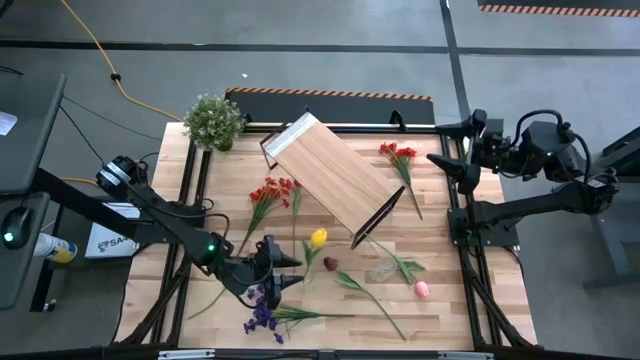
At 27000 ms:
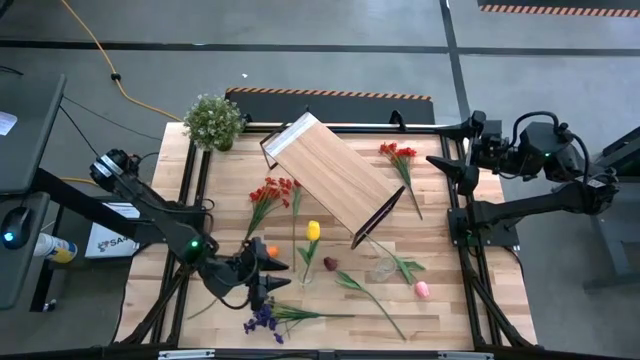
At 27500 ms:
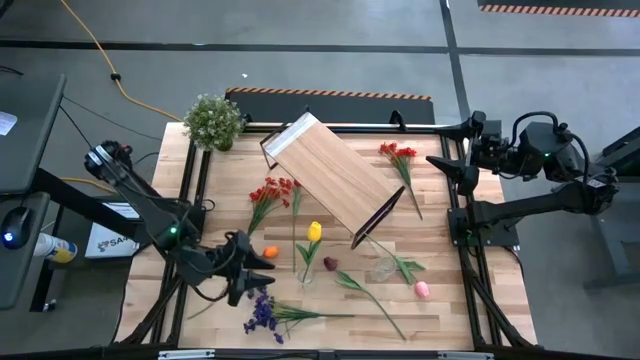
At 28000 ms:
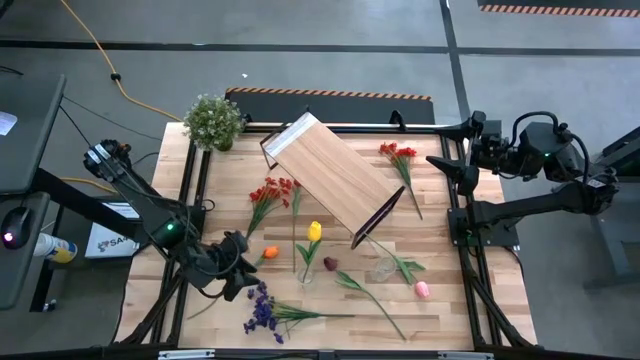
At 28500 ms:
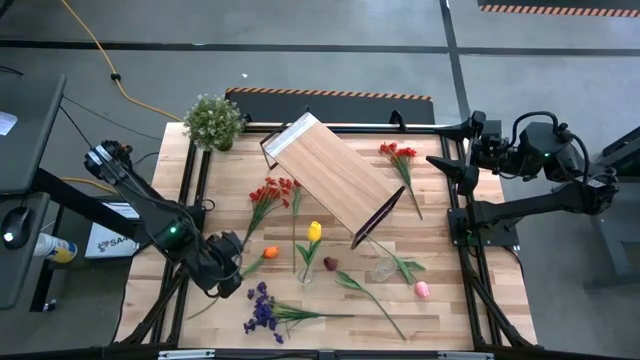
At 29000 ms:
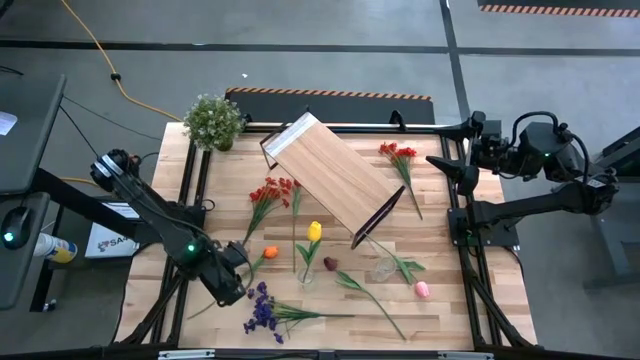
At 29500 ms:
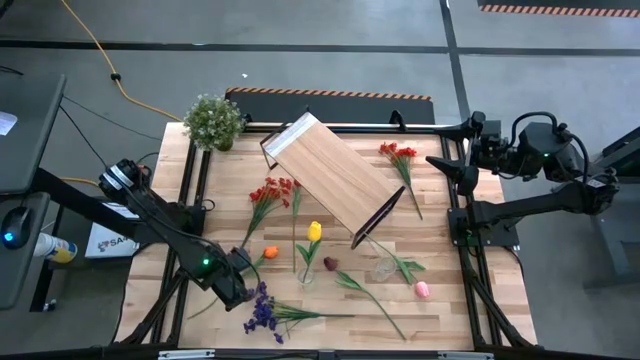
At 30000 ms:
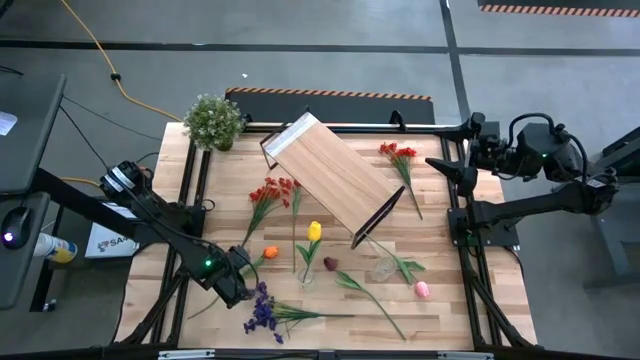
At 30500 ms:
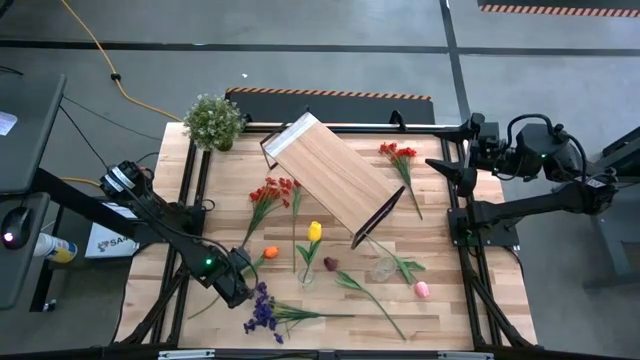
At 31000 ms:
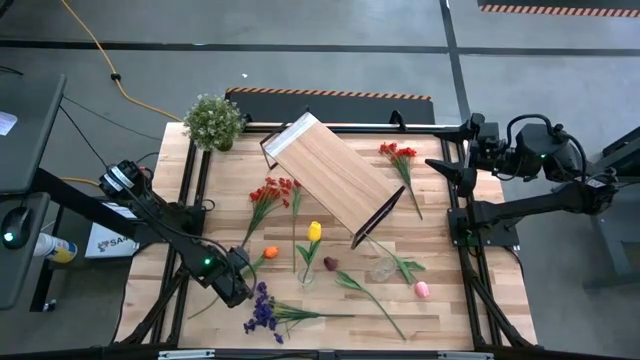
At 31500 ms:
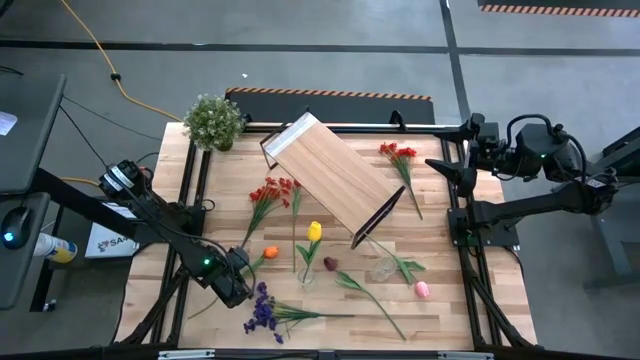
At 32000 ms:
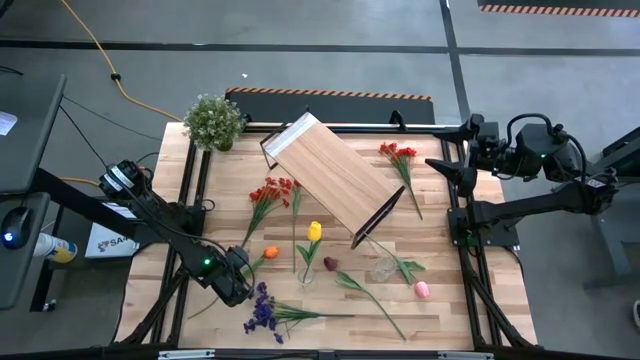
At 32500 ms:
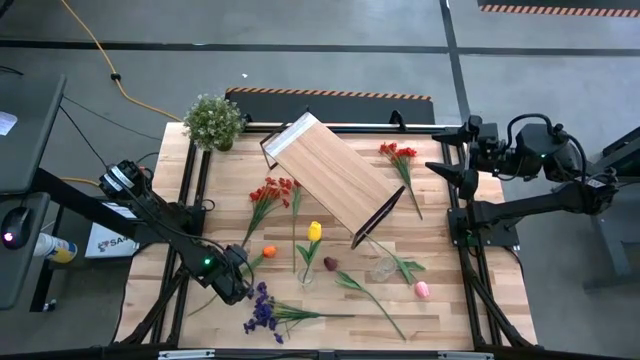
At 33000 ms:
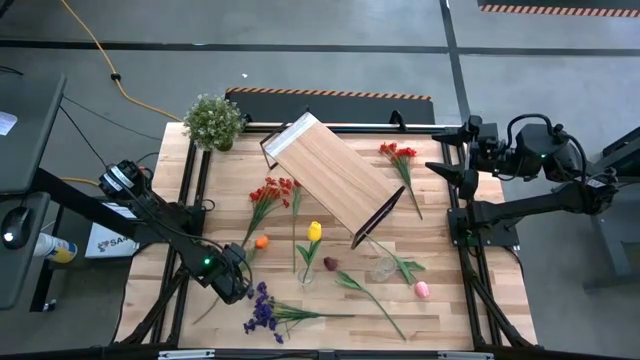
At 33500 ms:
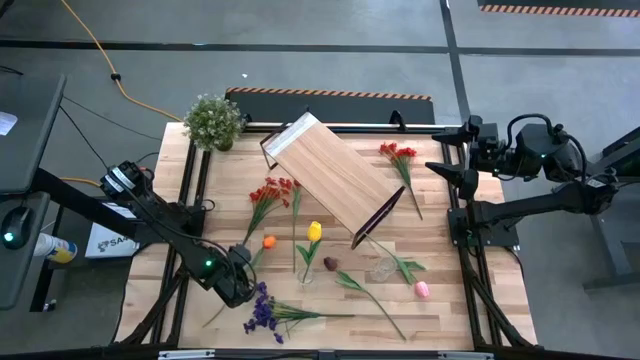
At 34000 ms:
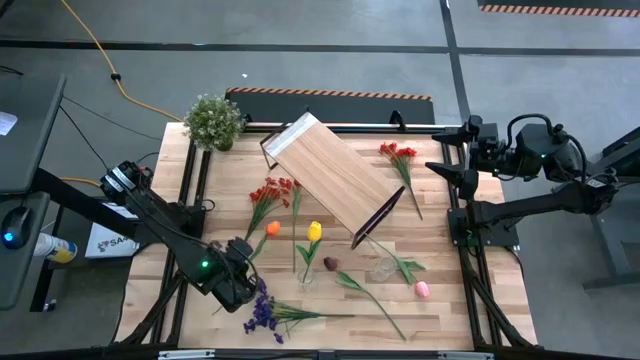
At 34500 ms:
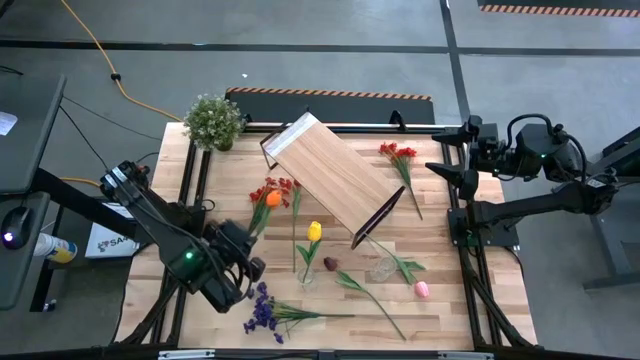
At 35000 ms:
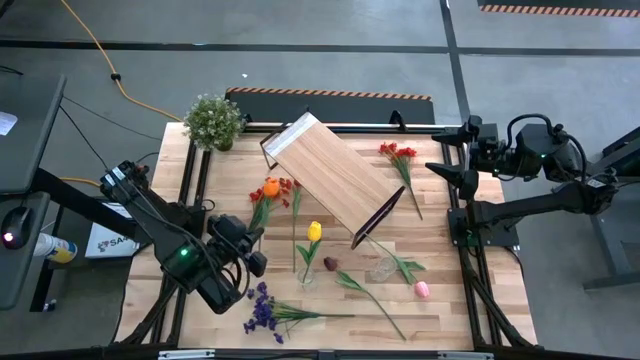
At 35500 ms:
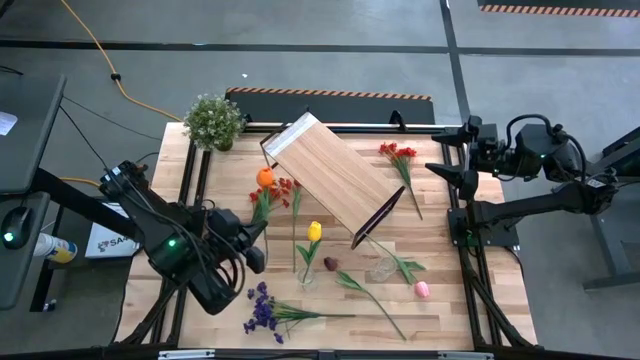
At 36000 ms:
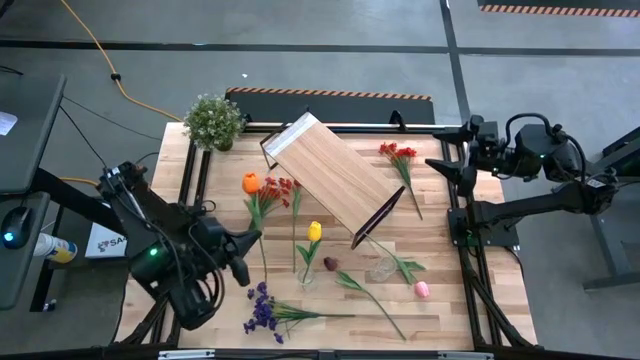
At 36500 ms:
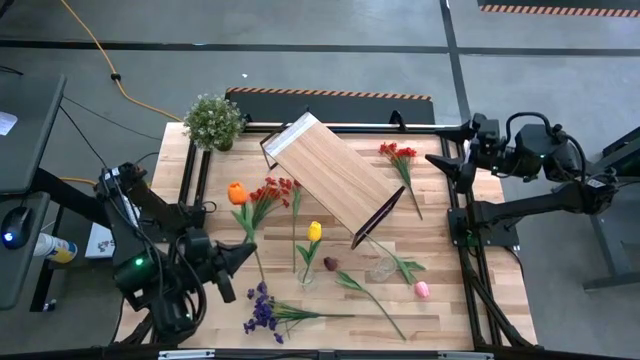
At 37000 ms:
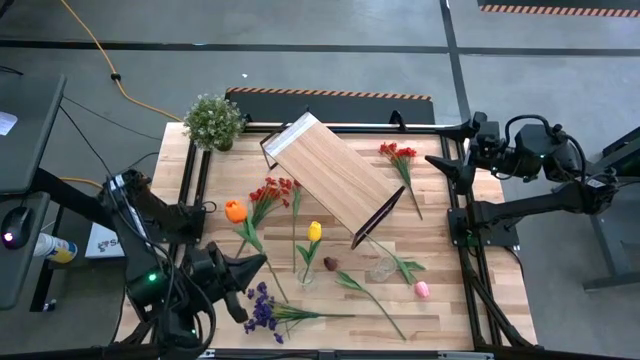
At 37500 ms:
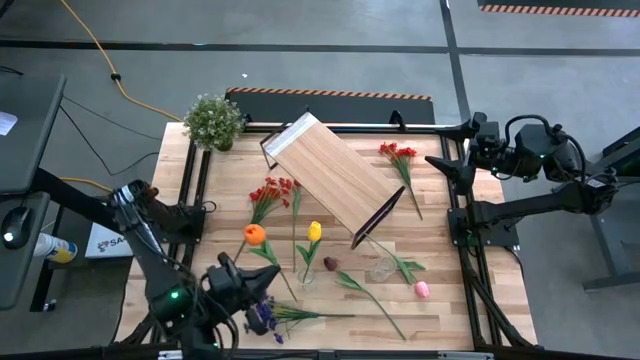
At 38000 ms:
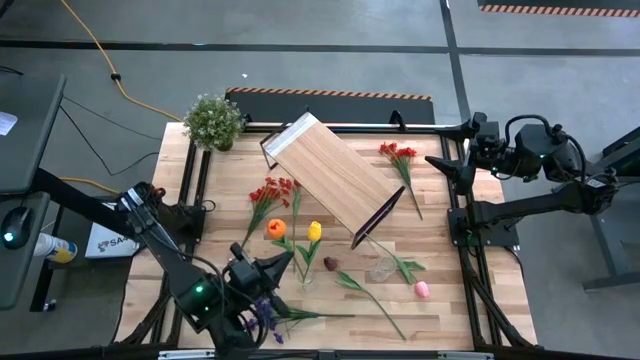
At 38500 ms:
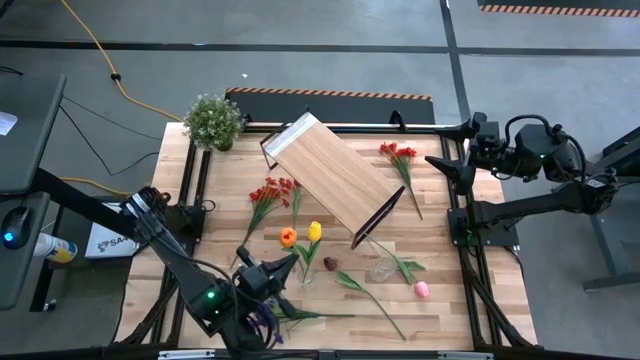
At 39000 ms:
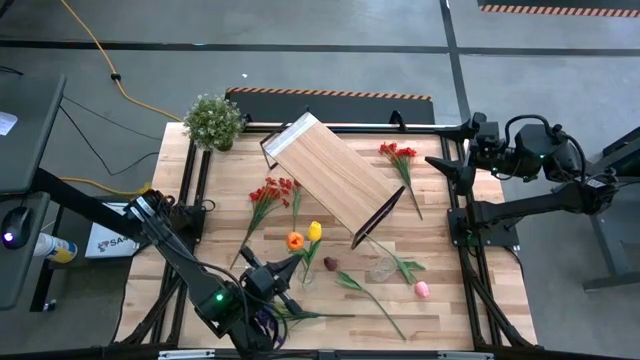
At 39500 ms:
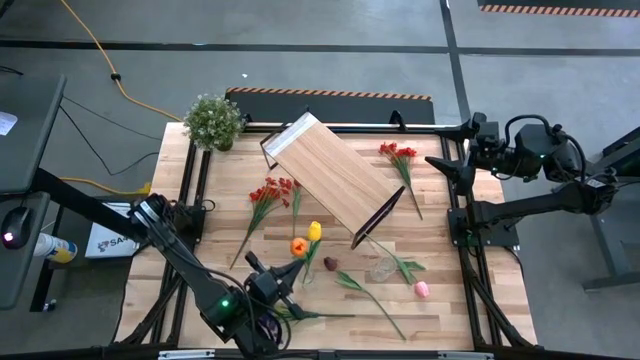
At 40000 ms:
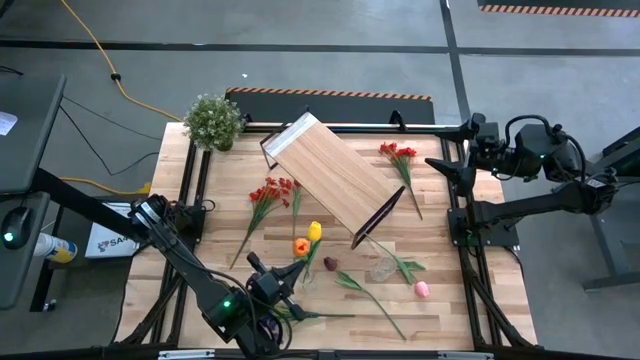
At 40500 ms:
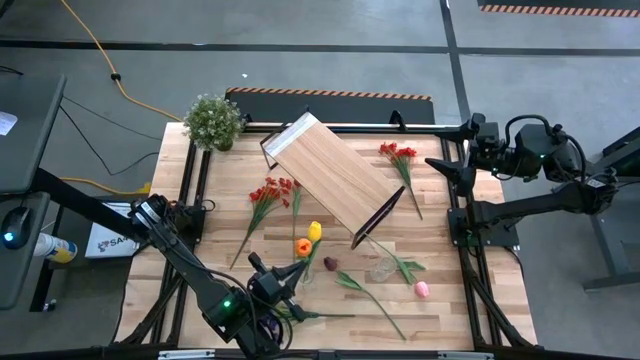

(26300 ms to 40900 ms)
Task: Pick and place flowers into a vace then onto a shelf
Put the orange tulip into the left transparent vase

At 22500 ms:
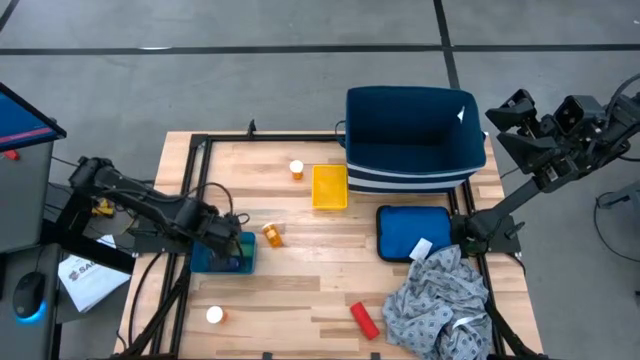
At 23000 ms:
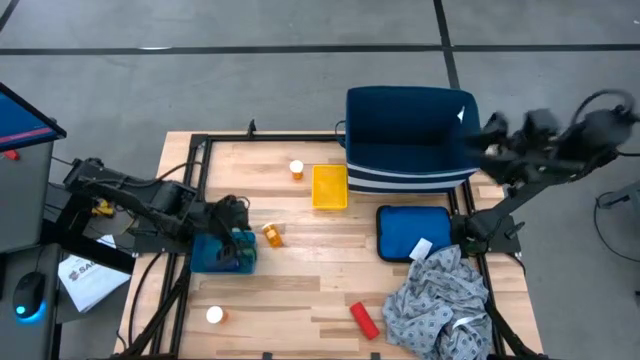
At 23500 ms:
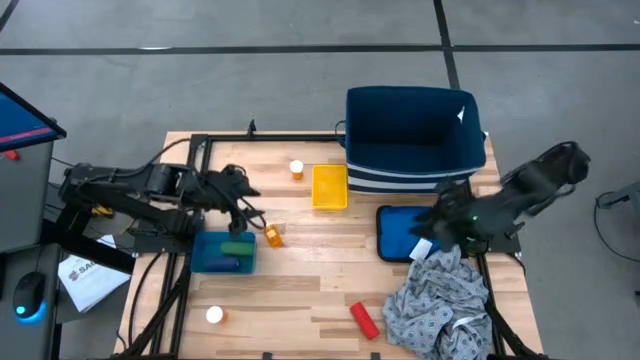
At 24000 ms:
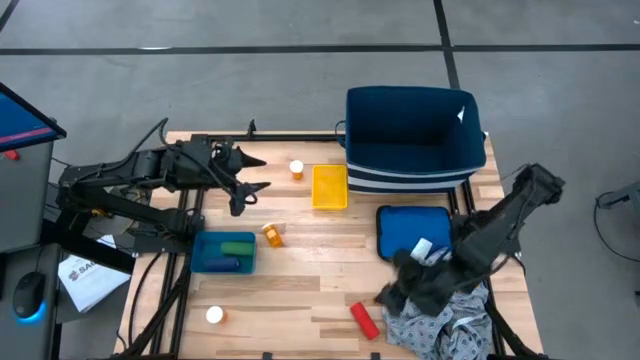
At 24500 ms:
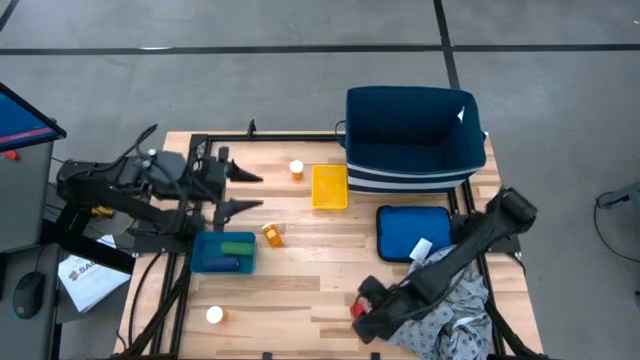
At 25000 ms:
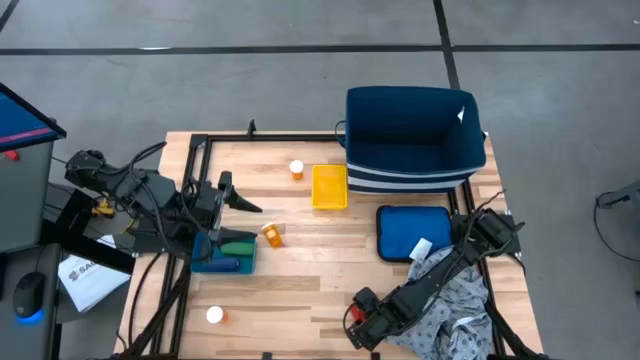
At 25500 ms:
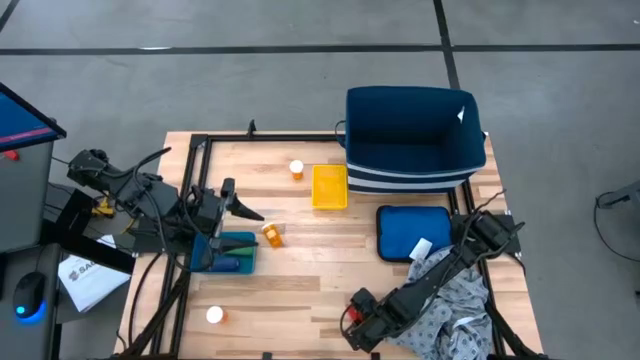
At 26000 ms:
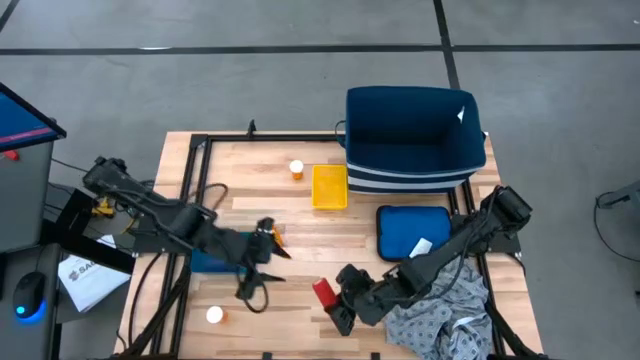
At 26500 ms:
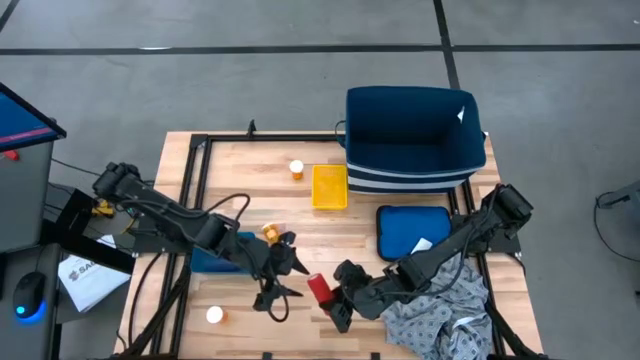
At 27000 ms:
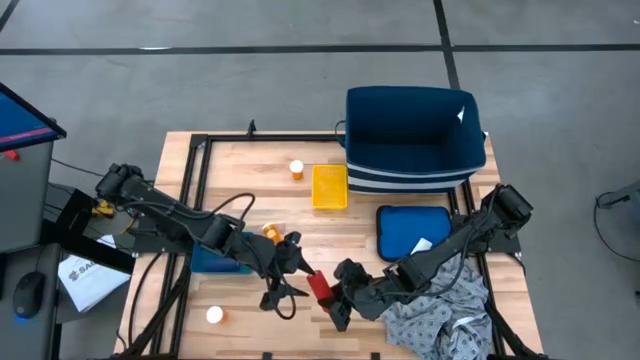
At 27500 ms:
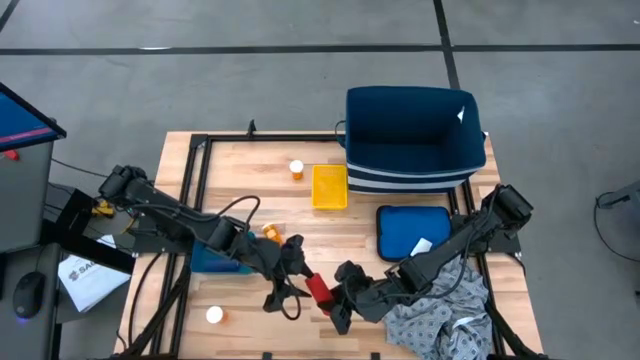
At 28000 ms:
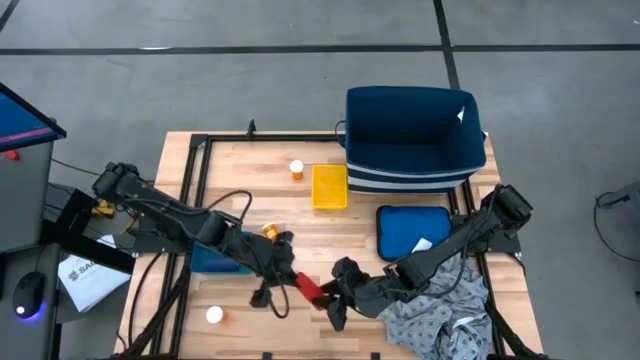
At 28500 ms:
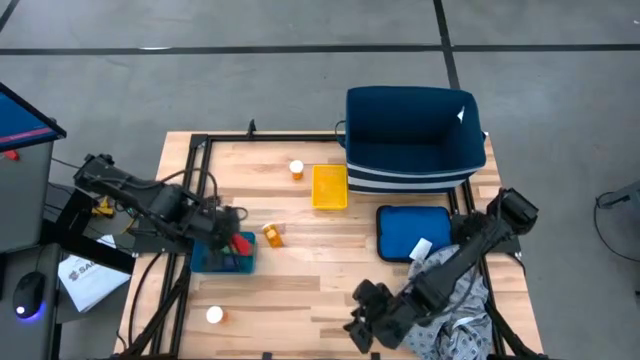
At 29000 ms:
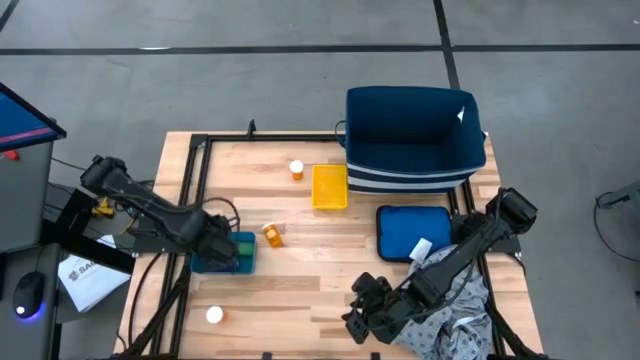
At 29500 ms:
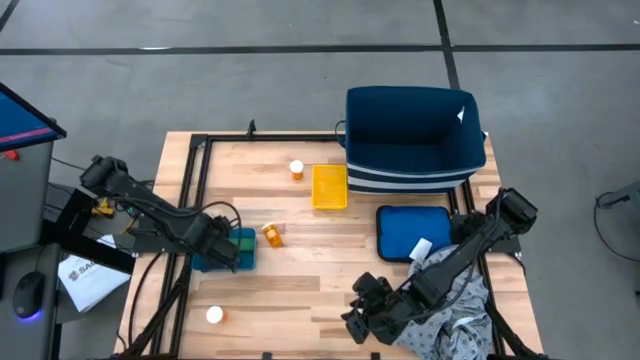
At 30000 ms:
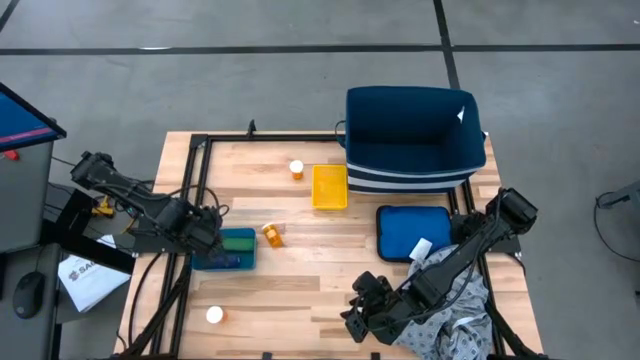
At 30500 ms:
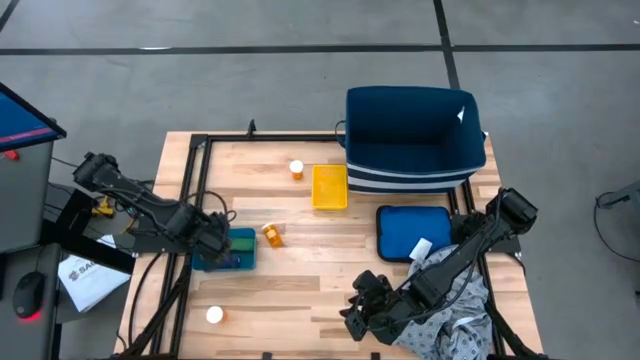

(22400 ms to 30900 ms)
Task: Pick & place medical supplies in basket/bin
Put the red bandage into the blue bin
